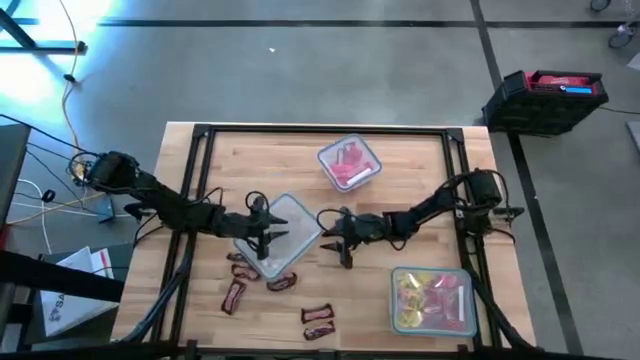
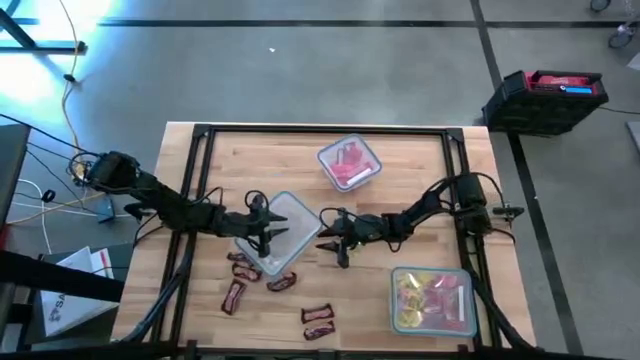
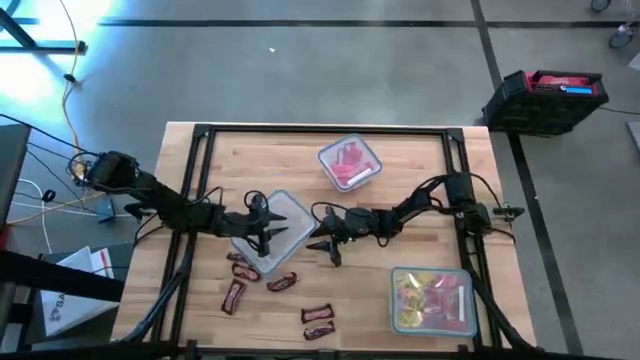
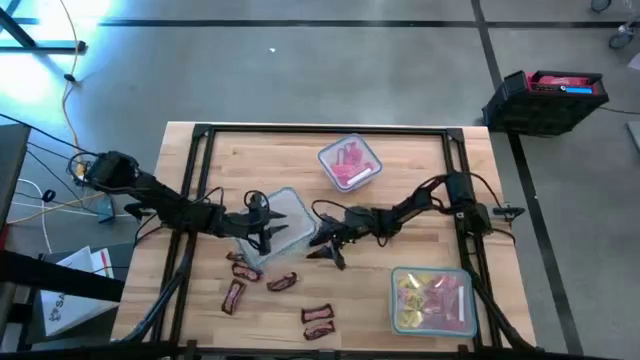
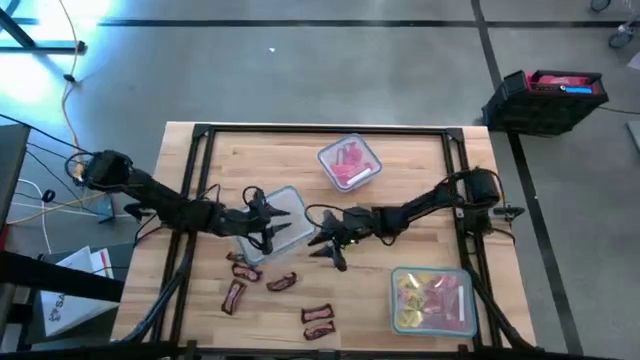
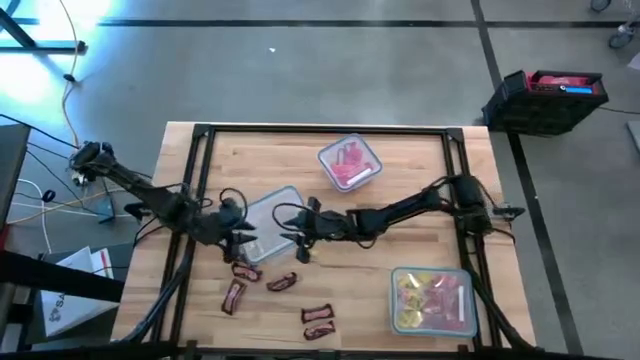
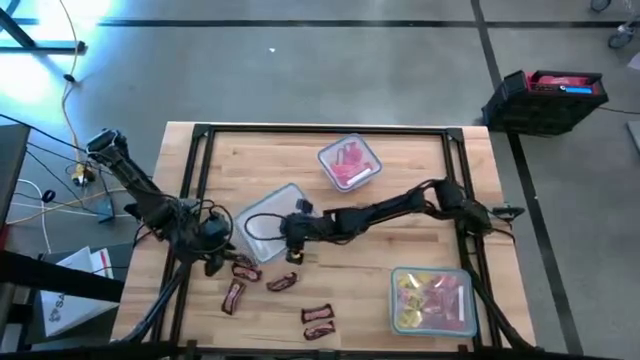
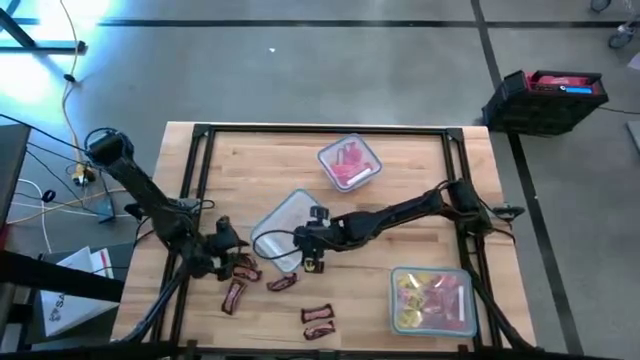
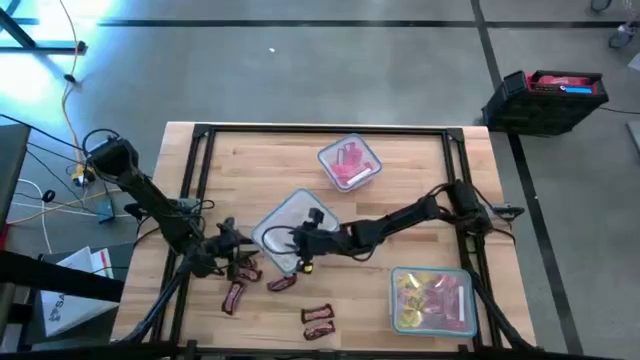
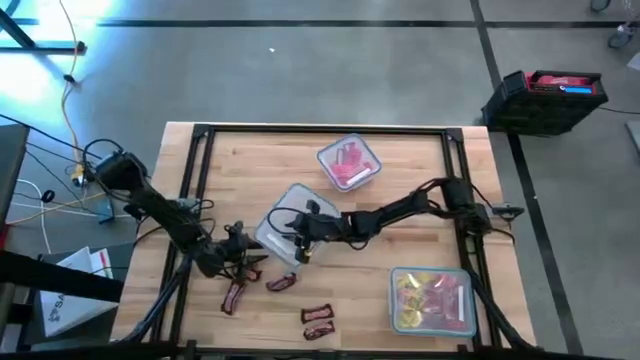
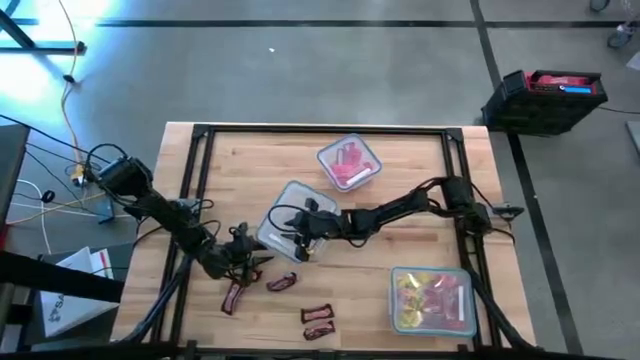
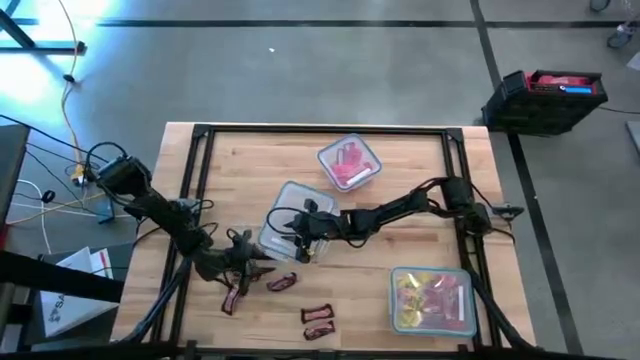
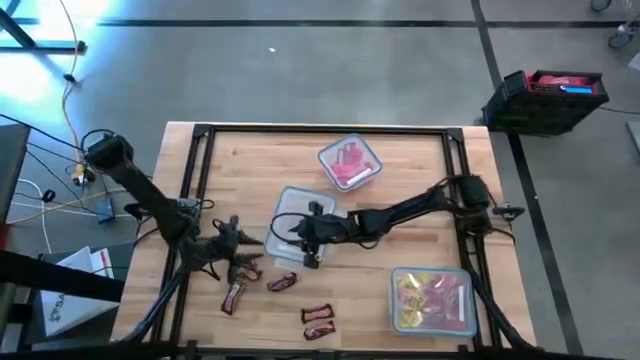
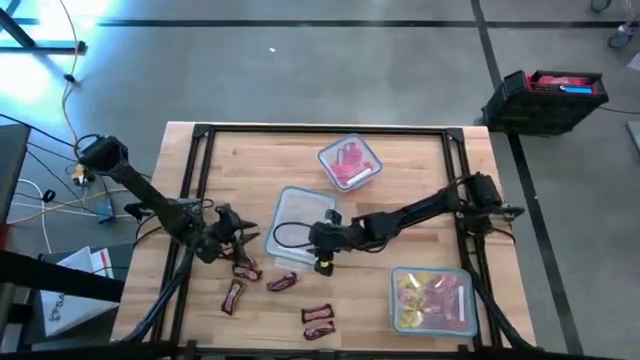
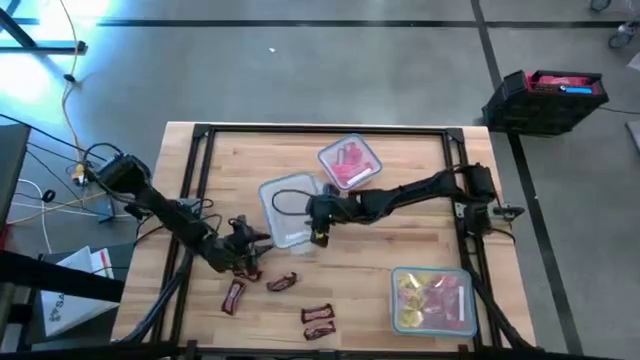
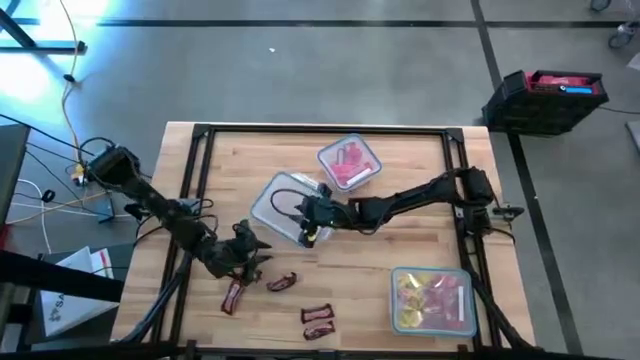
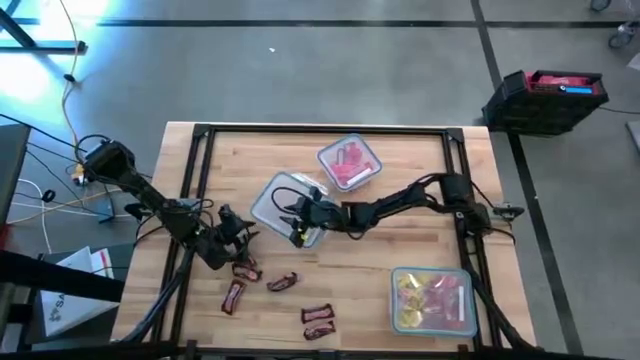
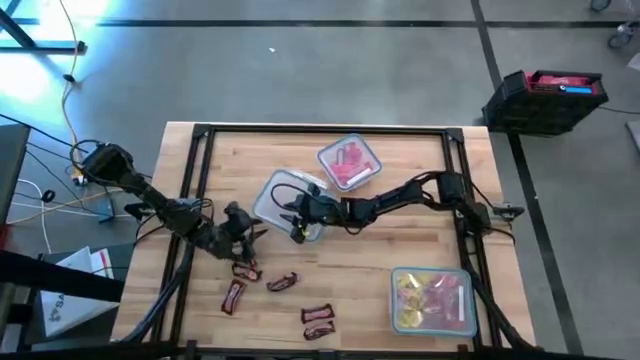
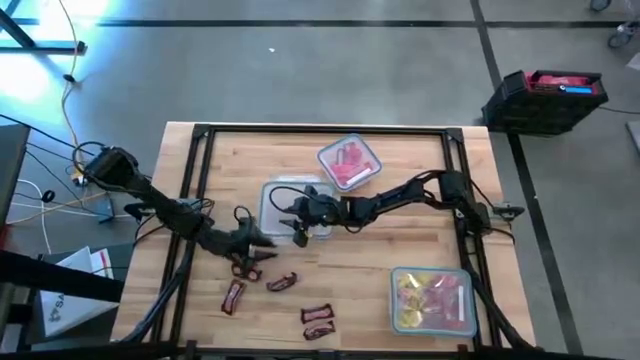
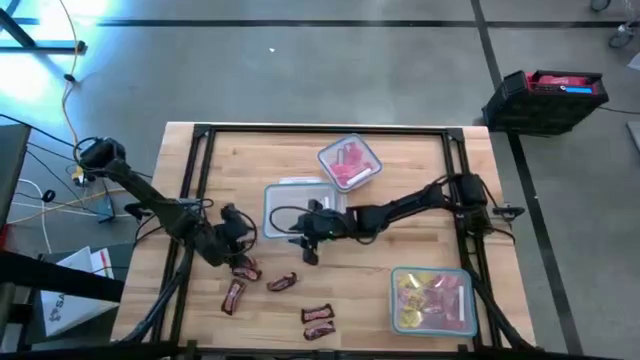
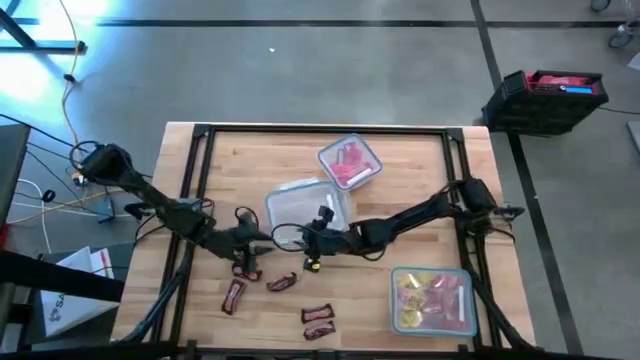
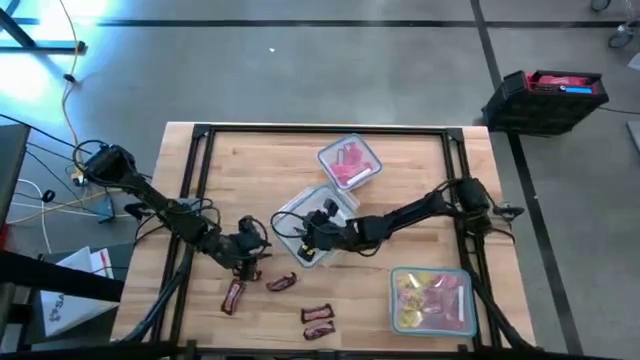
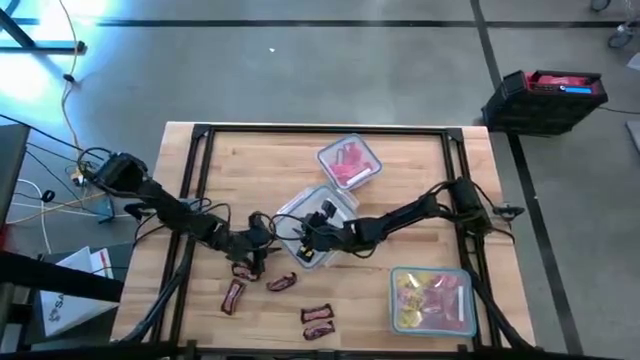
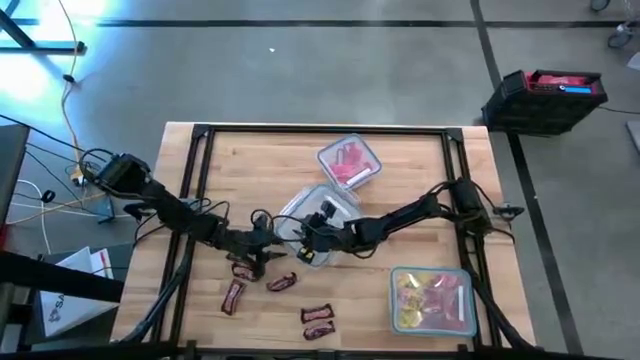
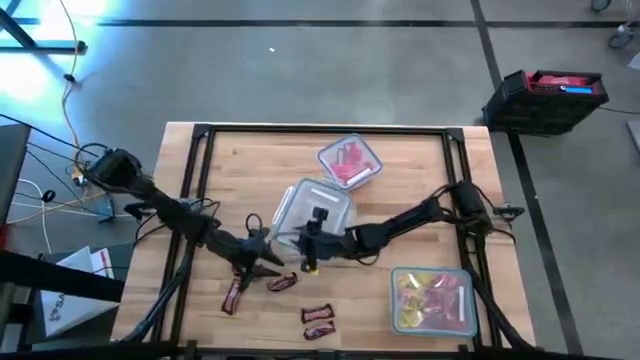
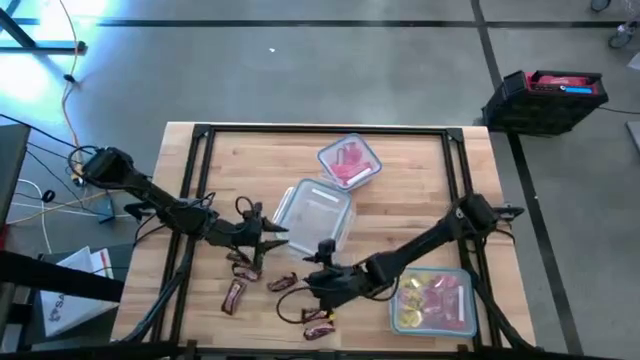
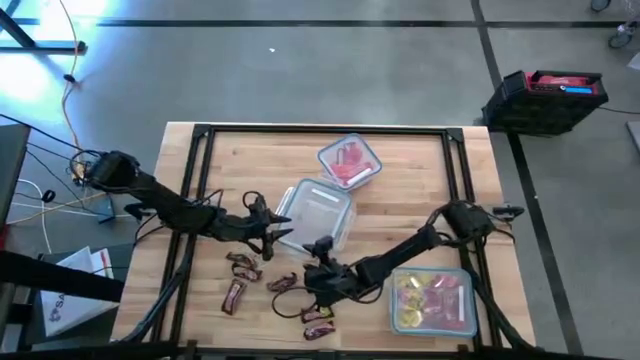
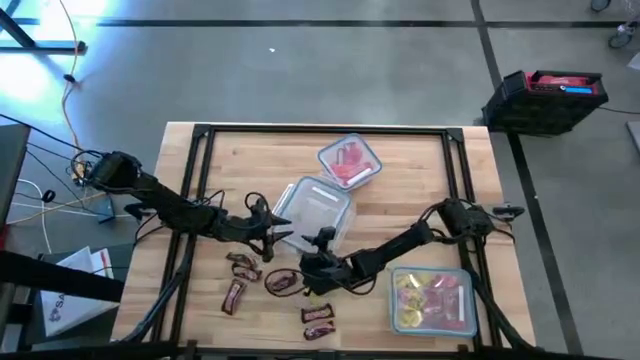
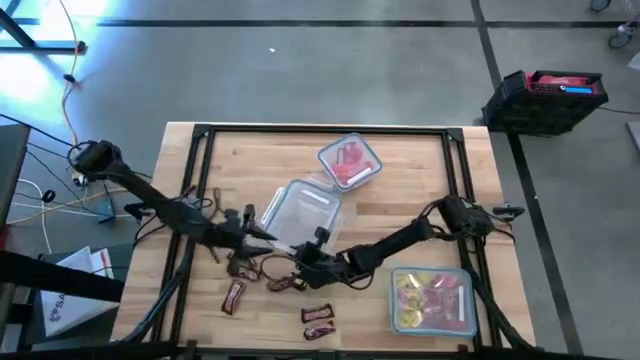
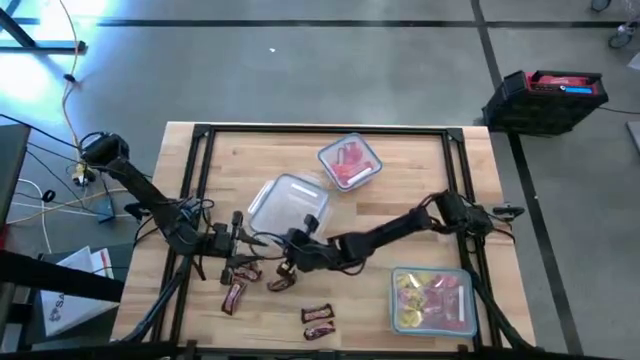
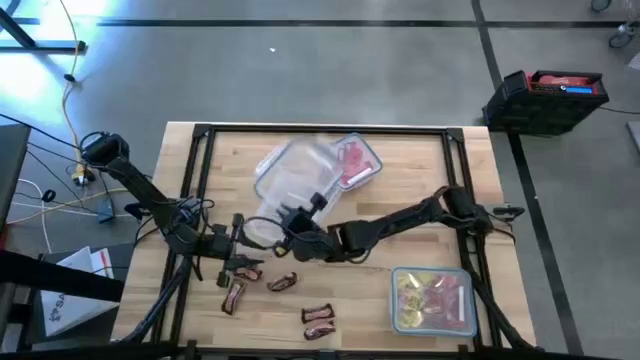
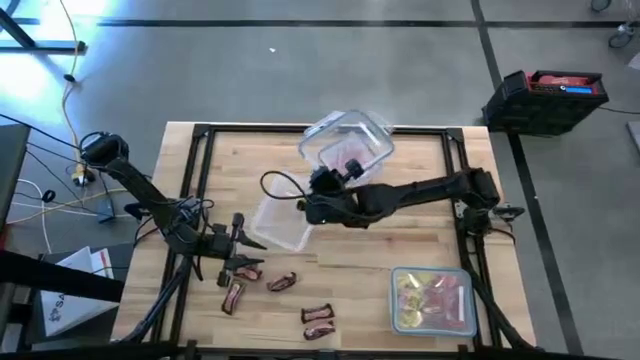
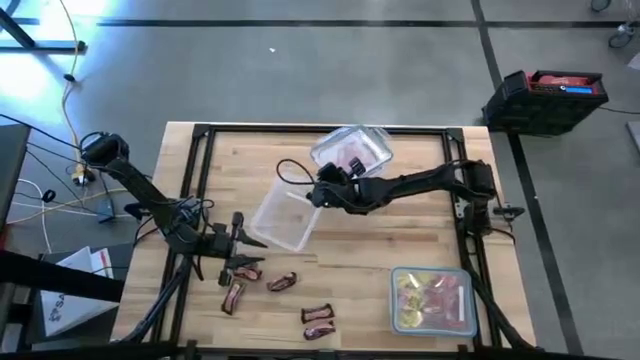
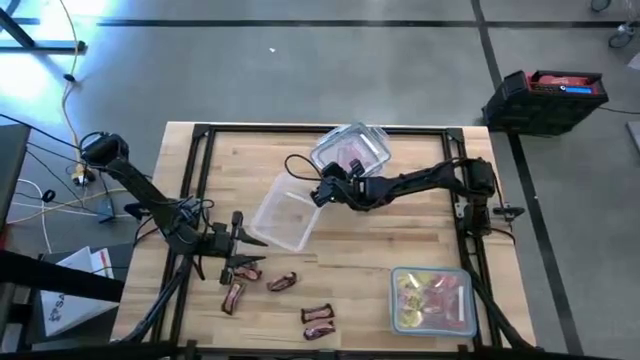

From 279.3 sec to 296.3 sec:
Task: Sort candy
Open the transparent bin

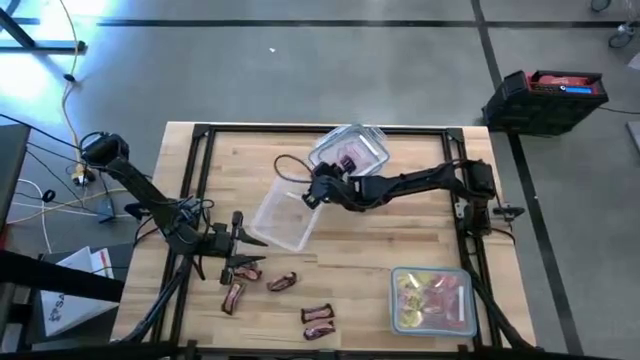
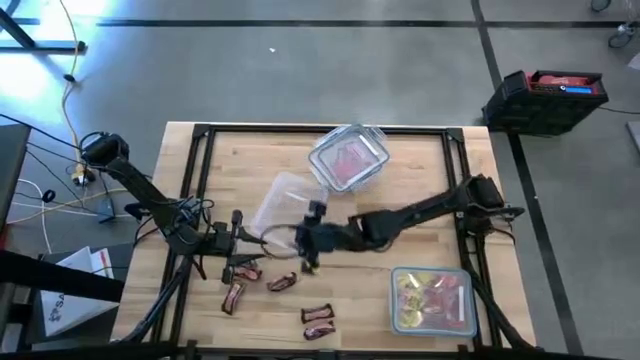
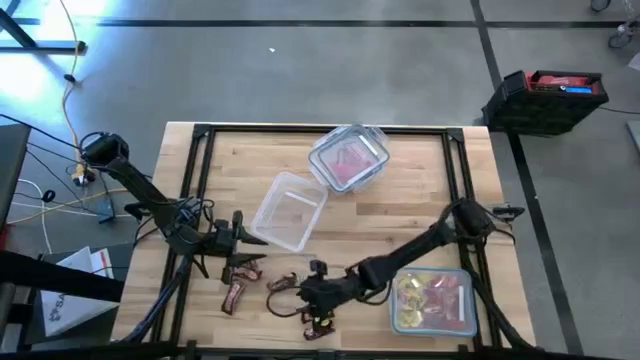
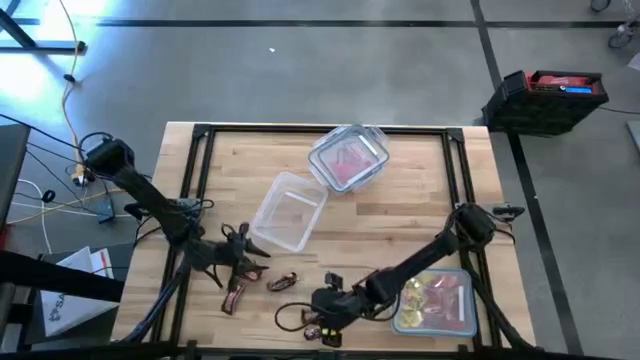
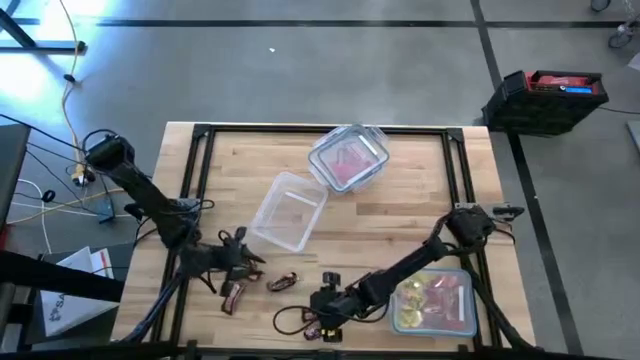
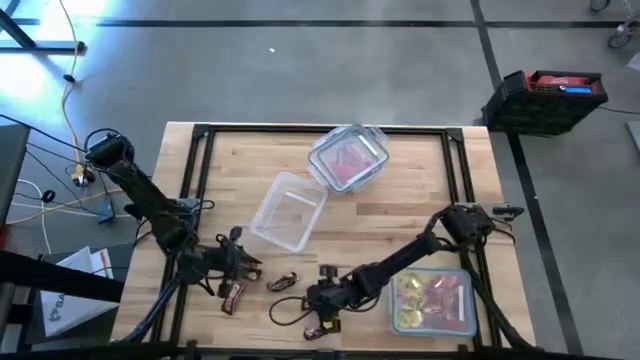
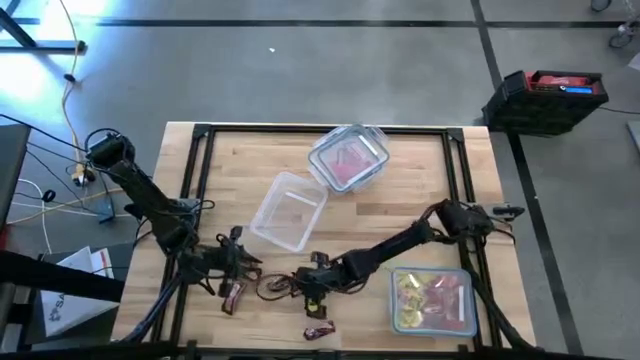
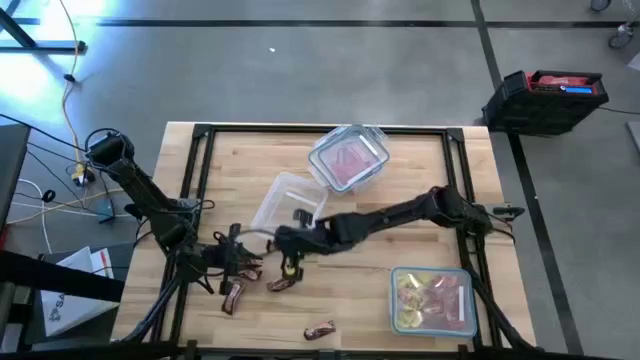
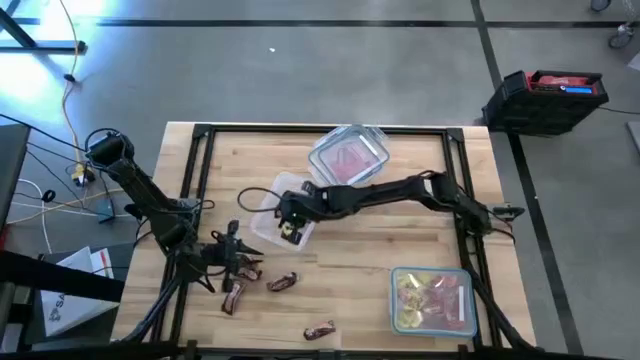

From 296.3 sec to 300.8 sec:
Put the brown chocolate bar into the transparent bin
